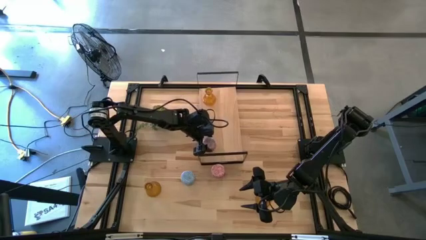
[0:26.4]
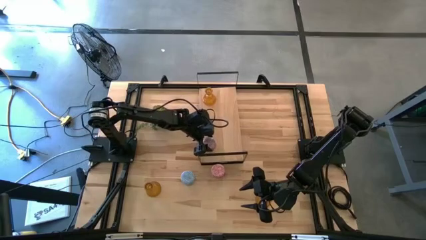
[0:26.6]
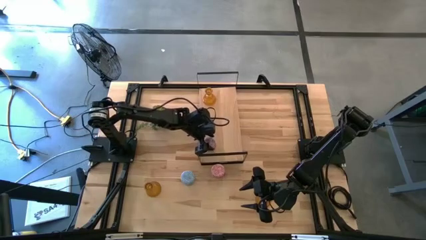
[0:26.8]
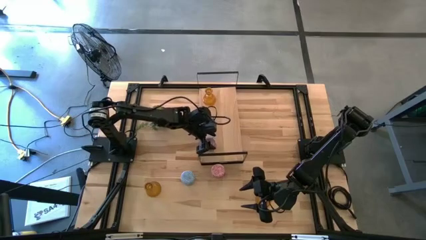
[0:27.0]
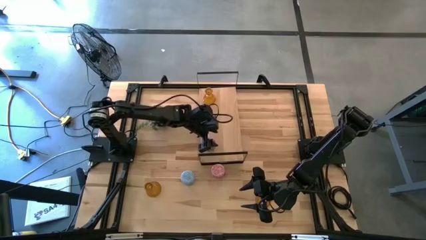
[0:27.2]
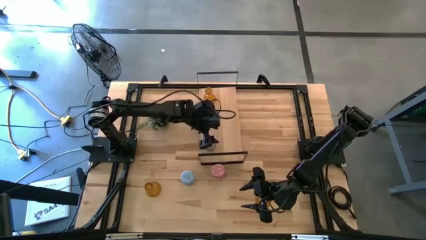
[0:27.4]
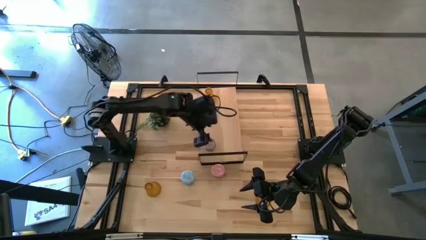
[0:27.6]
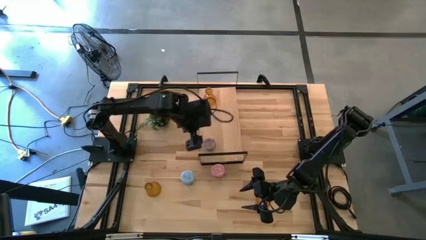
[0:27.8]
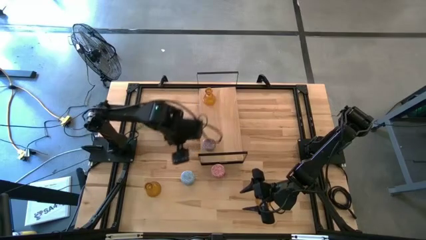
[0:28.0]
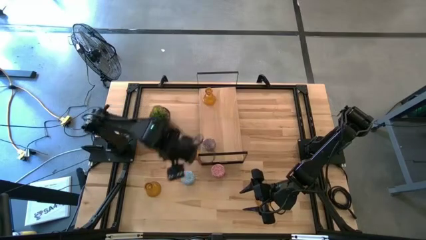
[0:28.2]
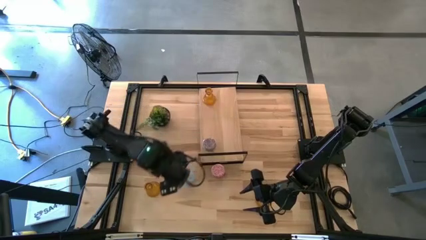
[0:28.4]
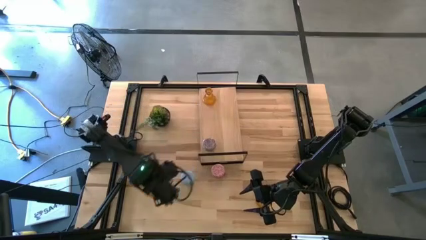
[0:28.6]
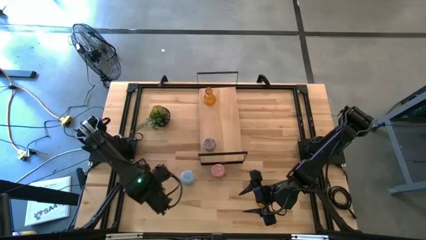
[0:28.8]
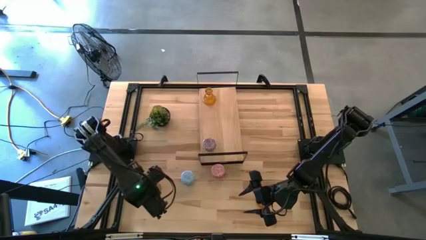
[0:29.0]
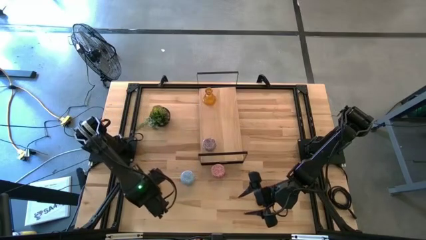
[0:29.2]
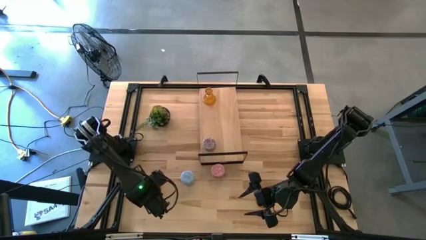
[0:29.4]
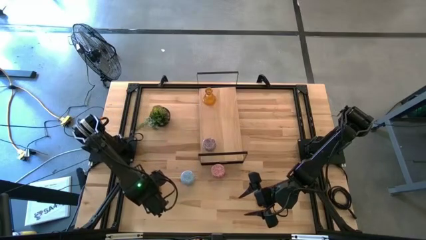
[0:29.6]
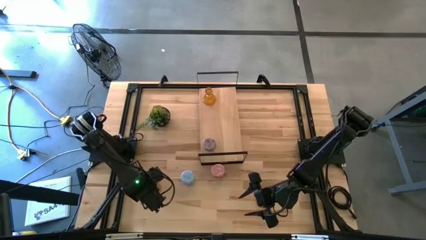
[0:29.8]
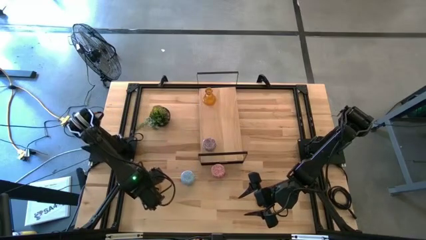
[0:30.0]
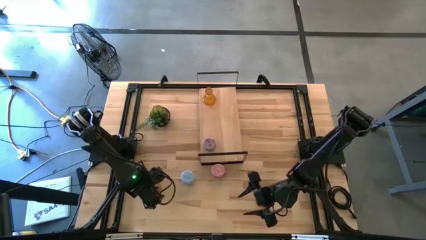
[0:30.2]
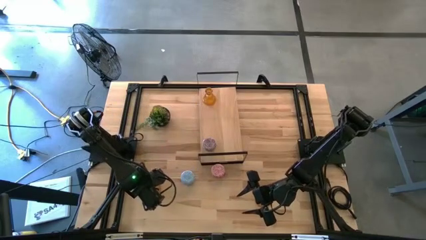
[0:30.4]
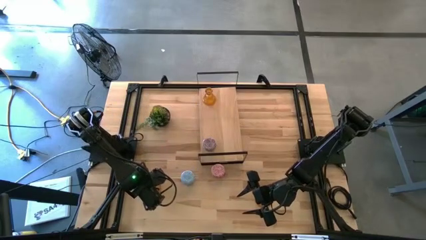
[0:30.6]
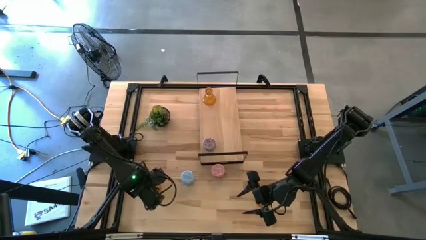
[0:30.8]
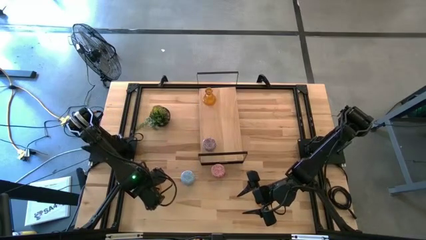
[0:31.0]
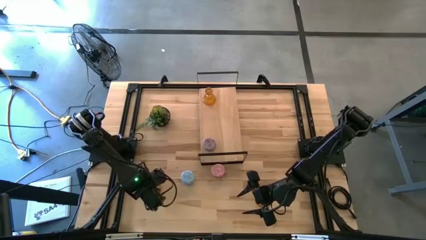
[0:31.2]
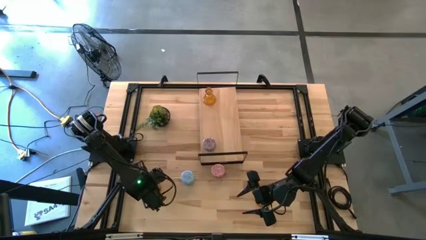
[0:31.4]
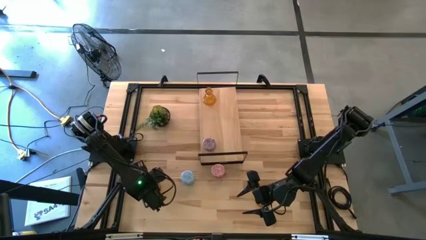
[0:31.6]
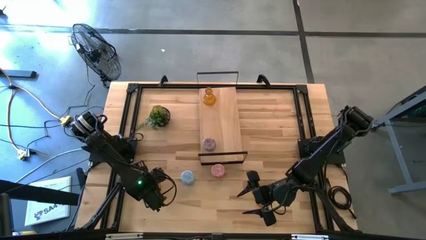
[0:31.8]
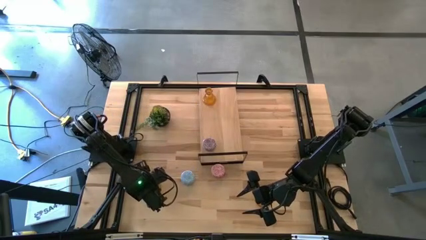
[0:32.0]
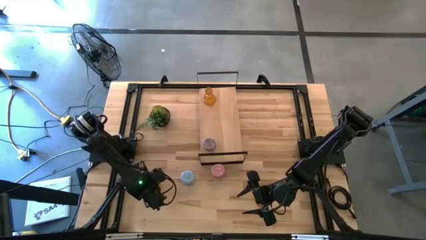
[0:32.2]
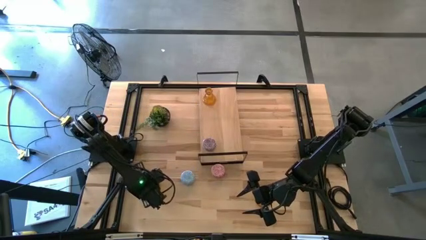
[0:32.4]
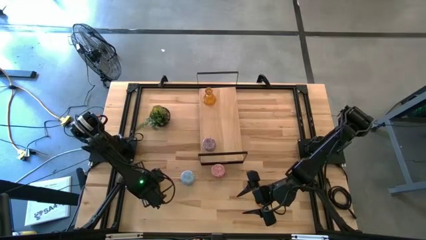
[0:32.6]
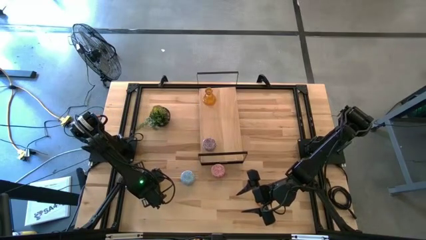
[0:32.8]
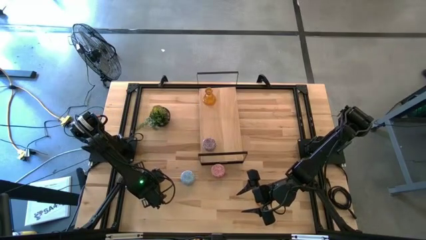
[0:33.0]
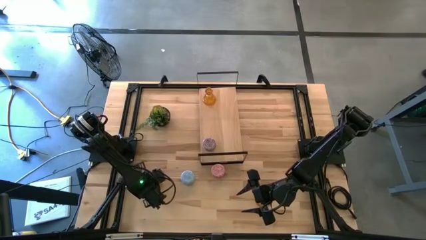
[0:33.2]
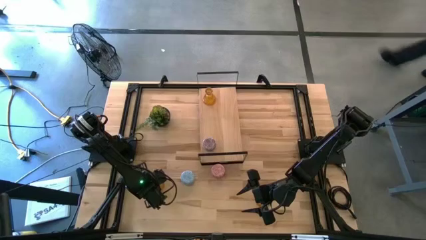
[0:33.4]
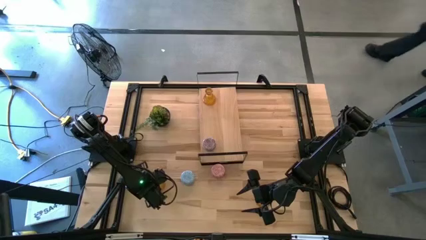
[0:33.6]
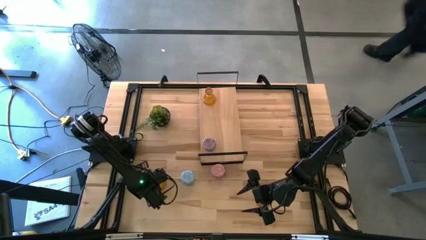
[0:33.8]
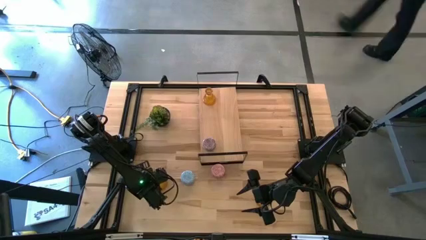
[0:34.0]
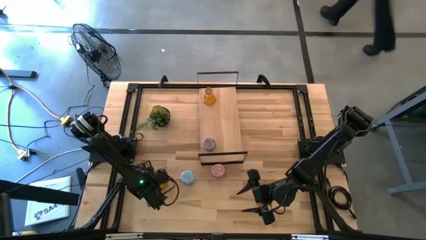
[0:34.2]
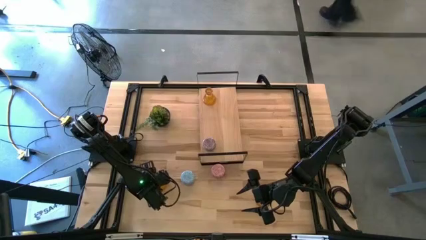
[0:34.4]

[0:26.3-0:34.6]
Task: Pick & Place candle stick holders
Put the left orange glass candle holder on the shelf

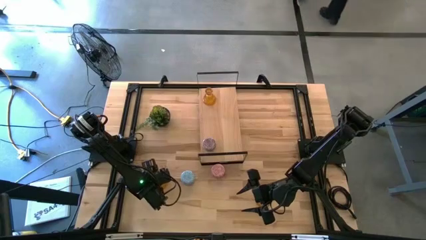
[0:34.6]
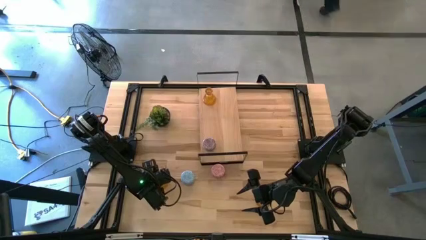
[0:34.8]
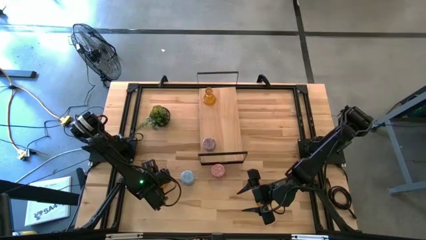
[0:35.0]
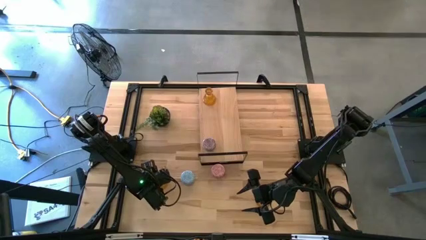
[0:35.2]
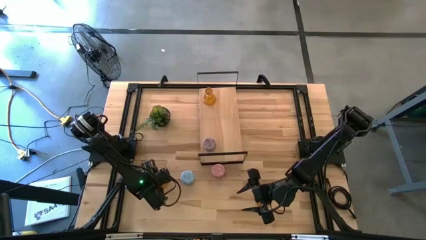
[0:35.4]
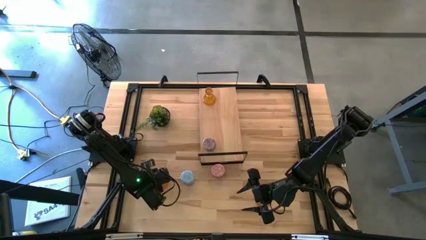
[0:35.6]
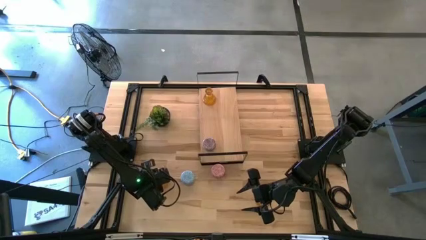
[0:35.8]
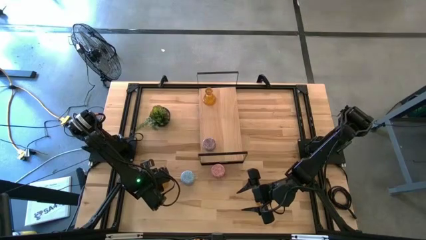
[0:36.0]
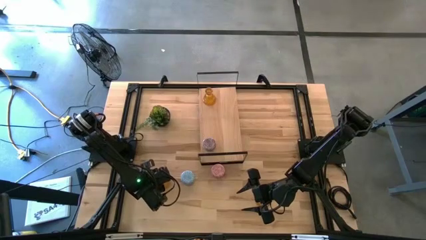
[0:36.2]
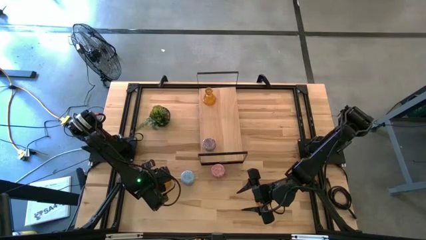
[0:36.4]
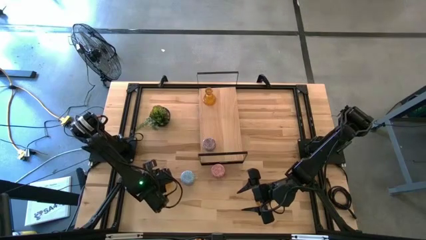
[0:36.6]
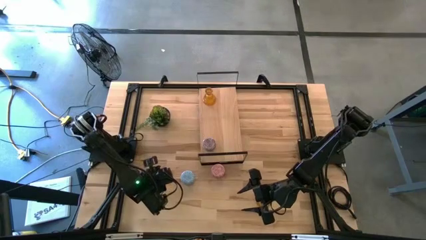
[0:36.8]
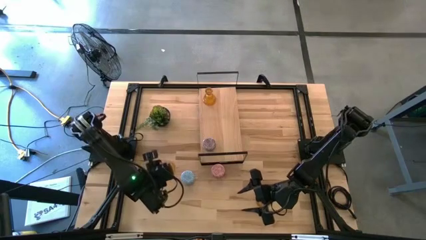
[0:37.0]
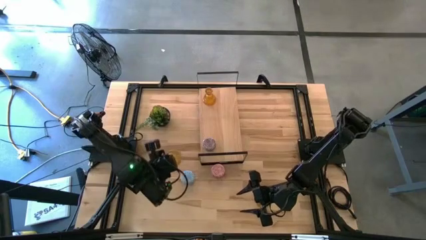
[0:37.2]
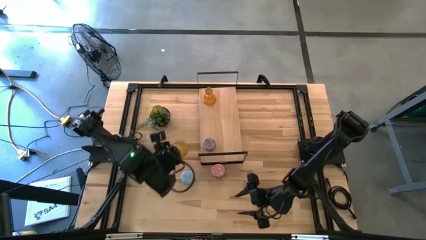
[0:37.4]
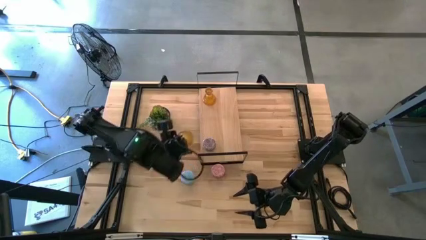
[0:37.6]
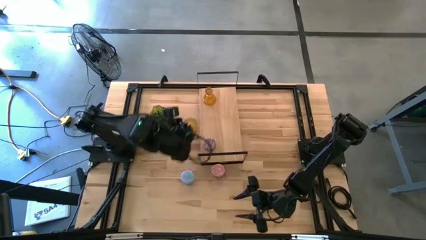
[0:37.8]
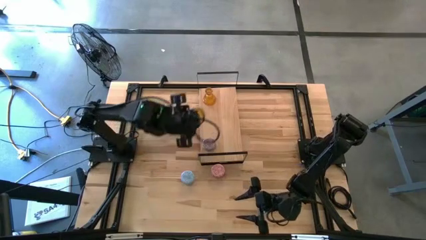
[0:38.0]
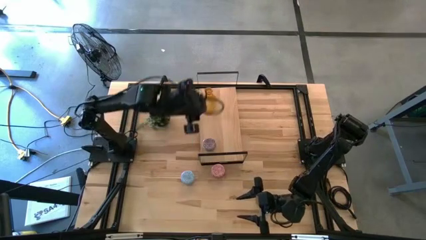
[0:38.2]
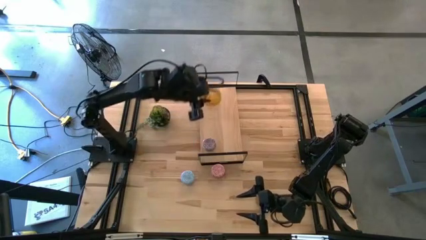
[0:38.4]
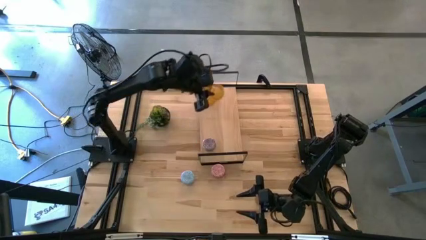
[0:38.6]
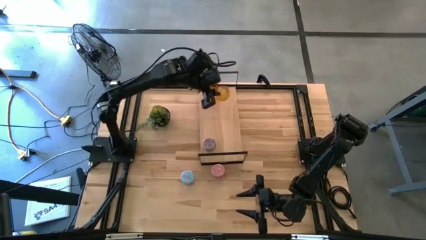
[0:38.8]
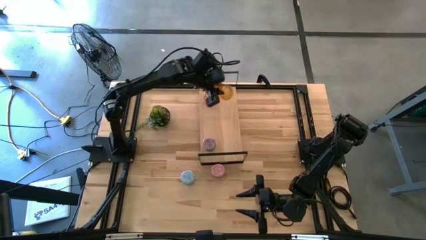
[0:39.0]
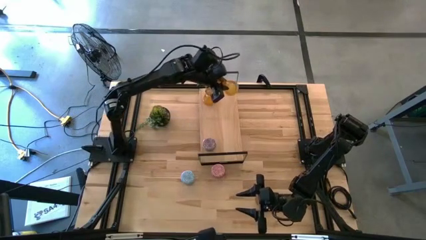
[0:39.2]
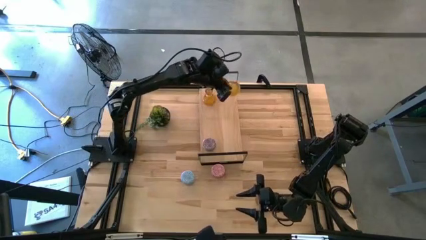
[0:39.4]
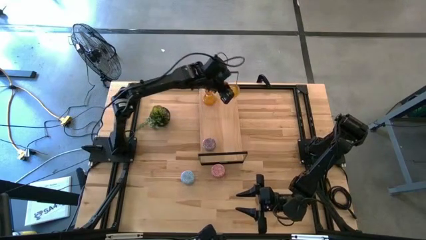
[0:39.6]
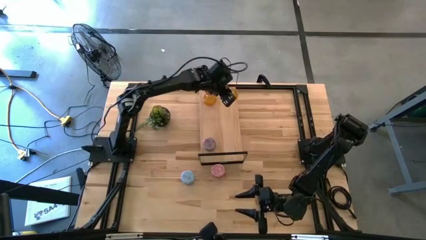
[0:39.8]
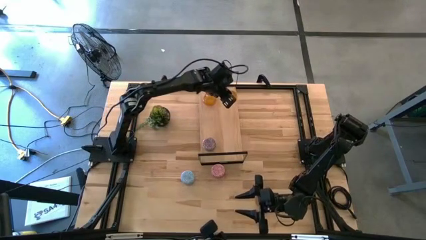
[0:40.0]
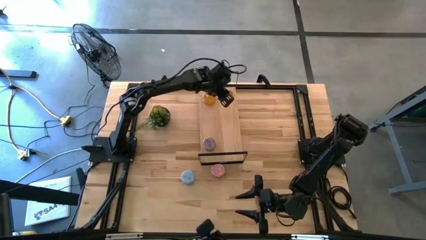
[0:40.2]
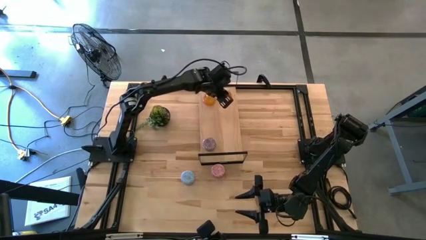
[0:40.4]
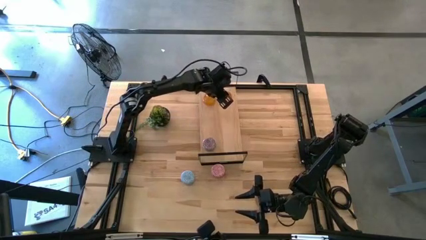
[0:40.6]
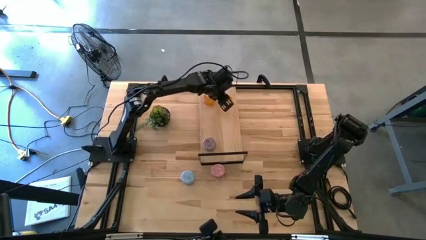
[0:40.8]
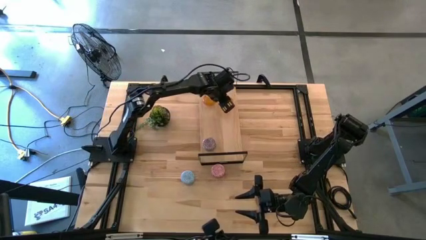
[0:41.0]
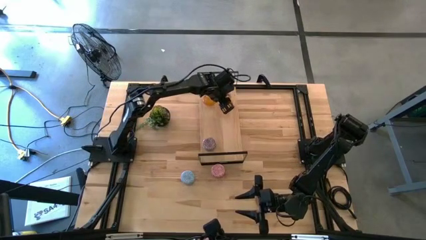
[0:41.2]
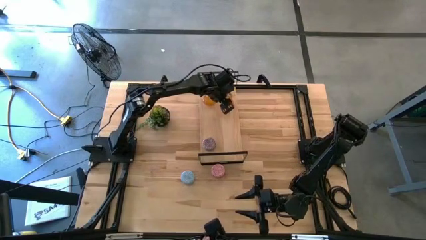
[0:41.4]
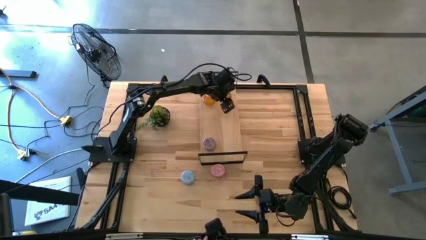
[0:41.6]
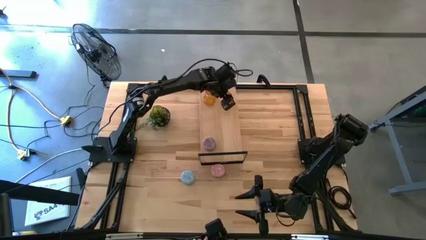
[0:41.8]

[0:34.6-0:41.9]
Put the left orange glass candle holder on the shelf
